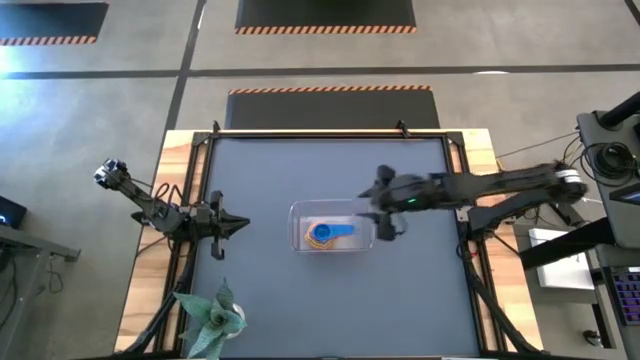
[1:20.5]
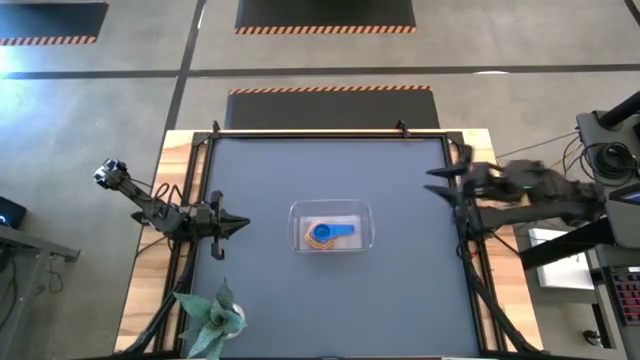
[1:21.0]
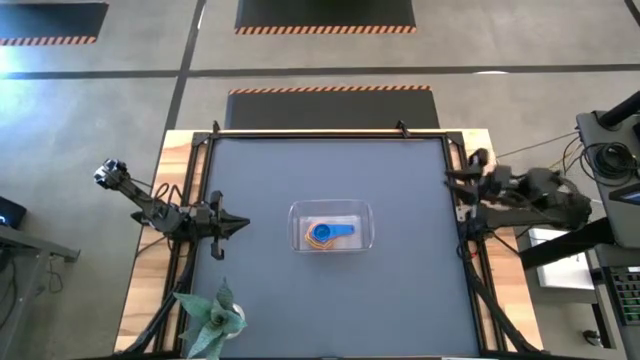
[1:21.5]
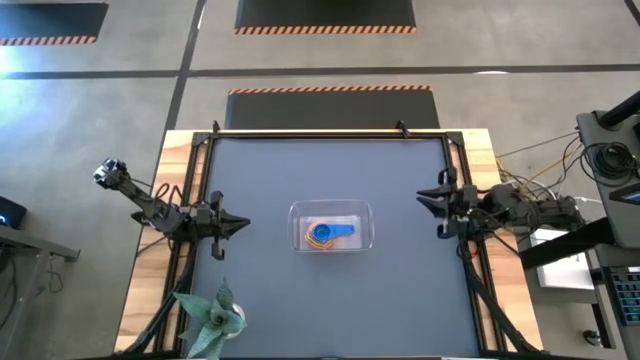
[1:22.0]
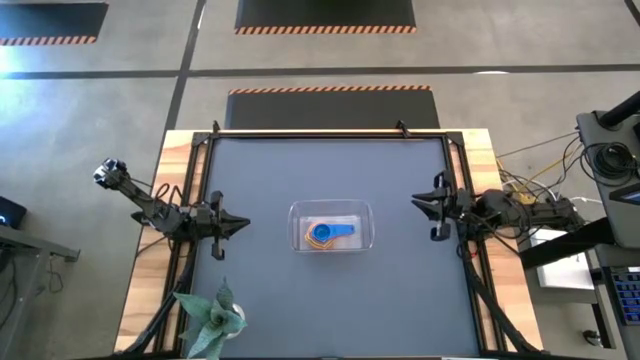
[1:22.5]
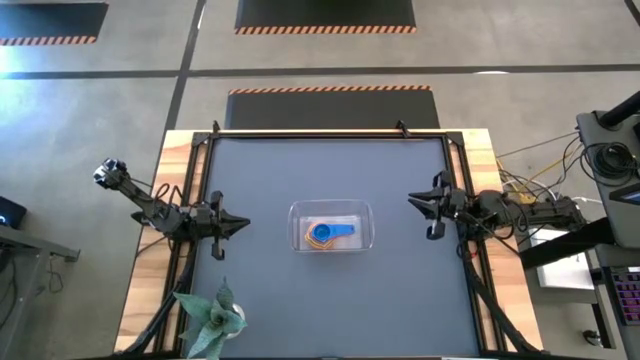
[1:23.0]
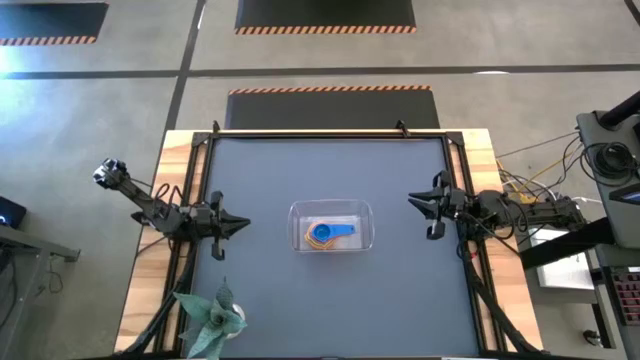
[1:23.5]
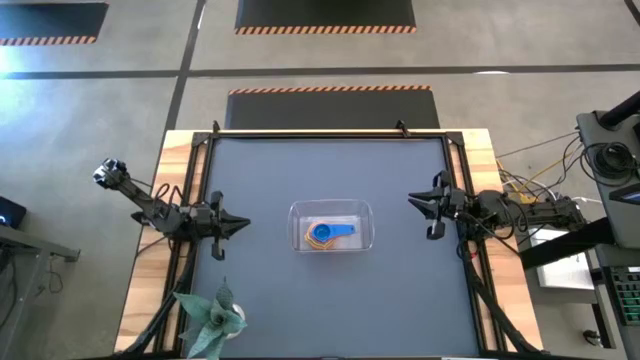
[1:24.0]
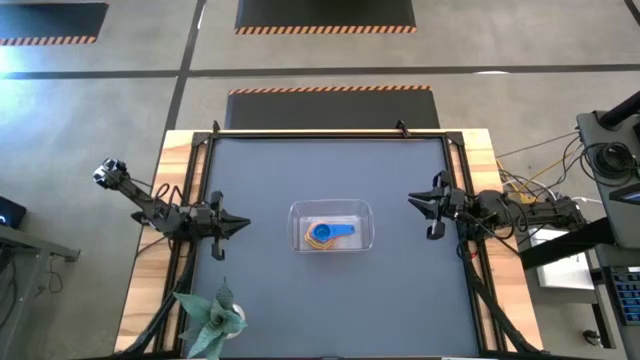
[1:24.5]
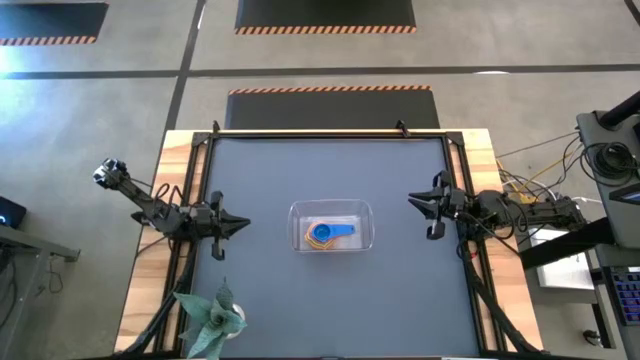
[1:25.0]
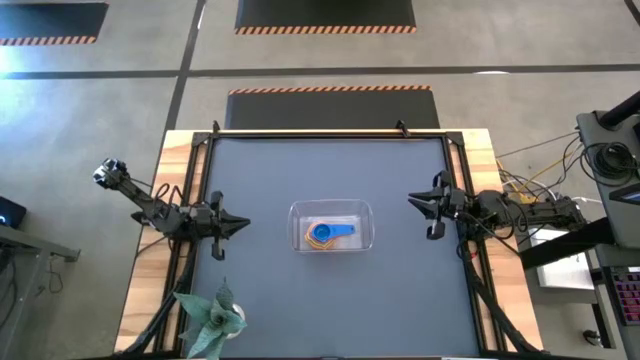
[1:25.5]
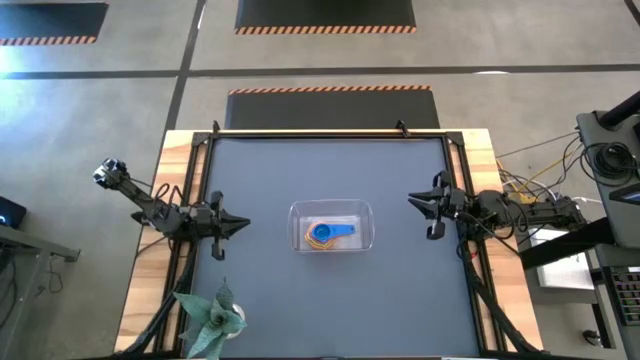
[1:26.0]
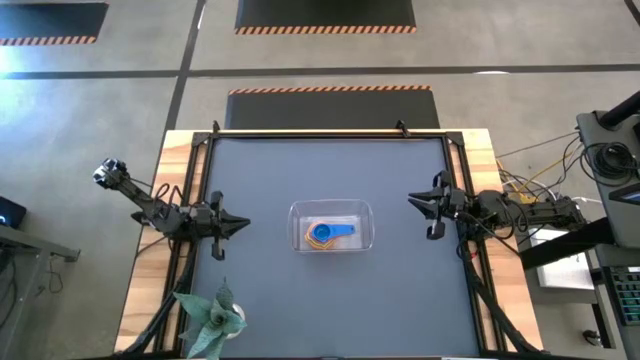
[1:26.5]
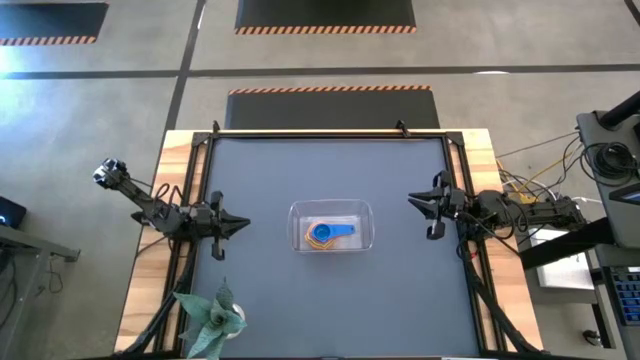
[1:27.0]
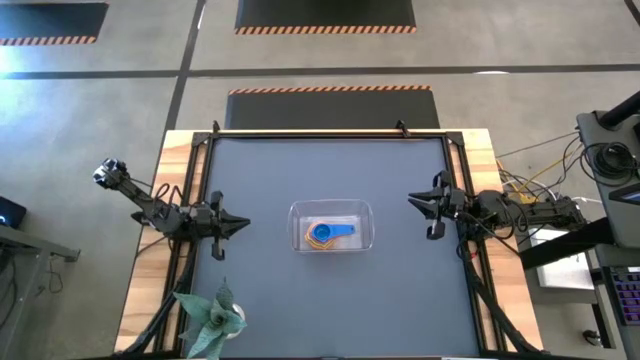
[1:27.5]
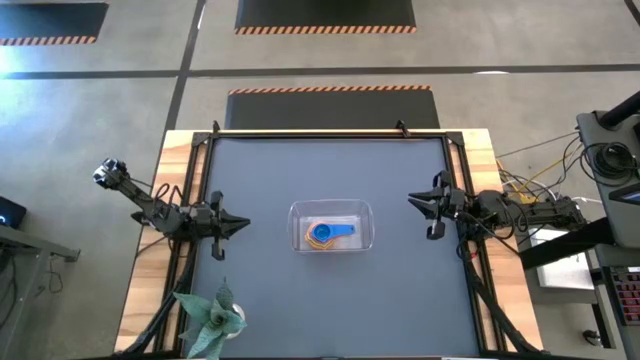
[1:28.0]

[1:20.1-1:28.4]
Task: Nest measuring cups in basket
Return to Home Position

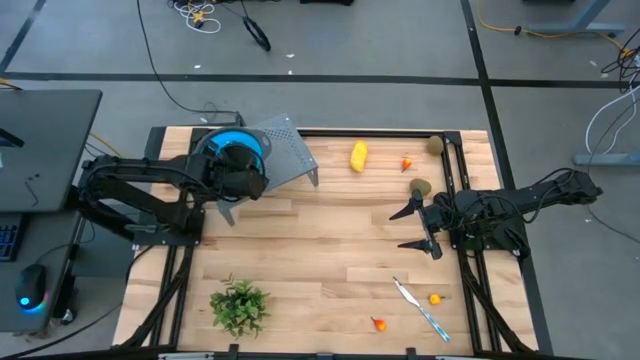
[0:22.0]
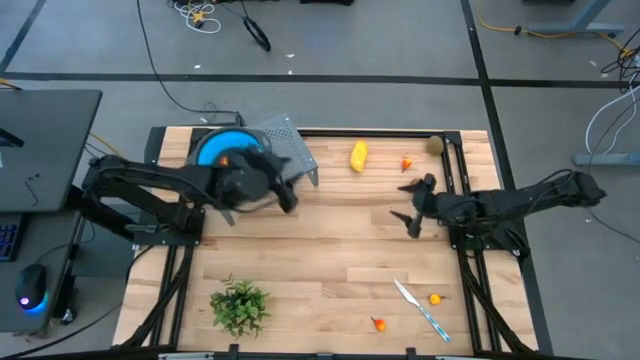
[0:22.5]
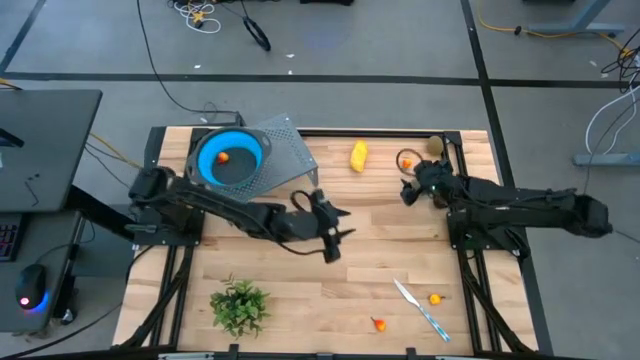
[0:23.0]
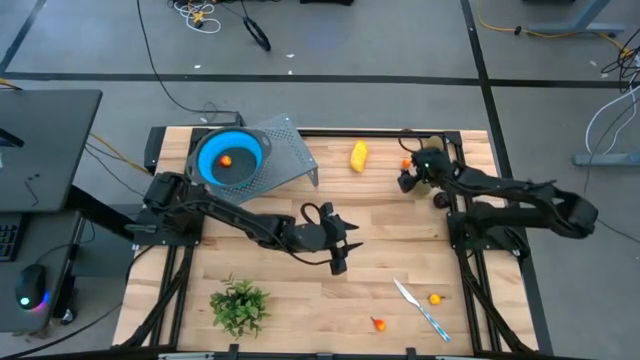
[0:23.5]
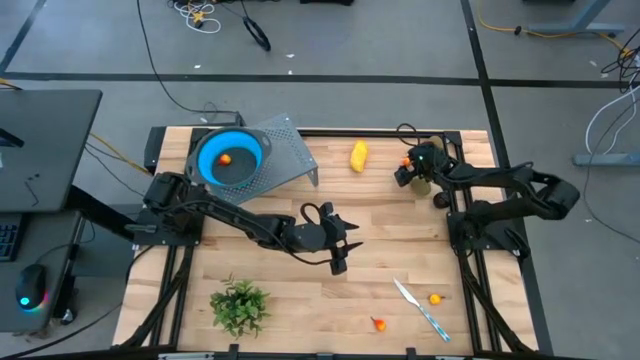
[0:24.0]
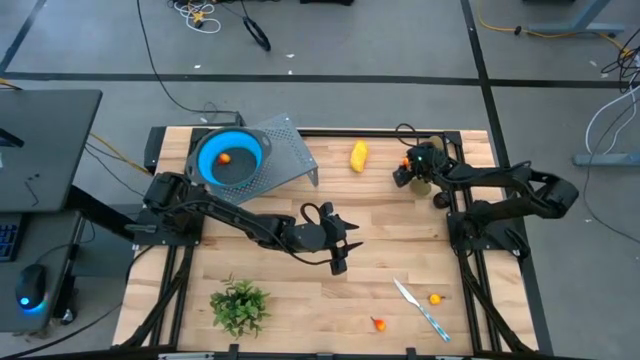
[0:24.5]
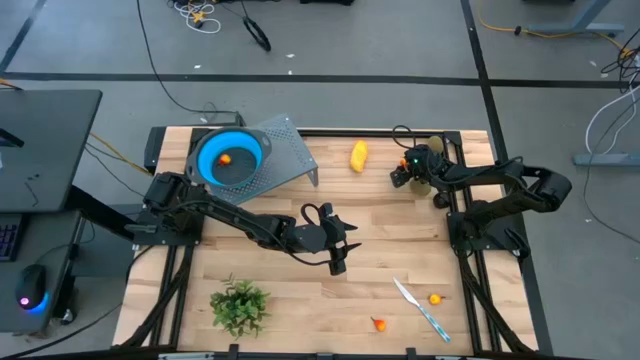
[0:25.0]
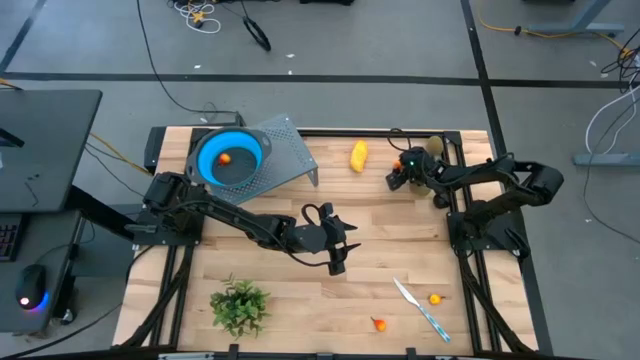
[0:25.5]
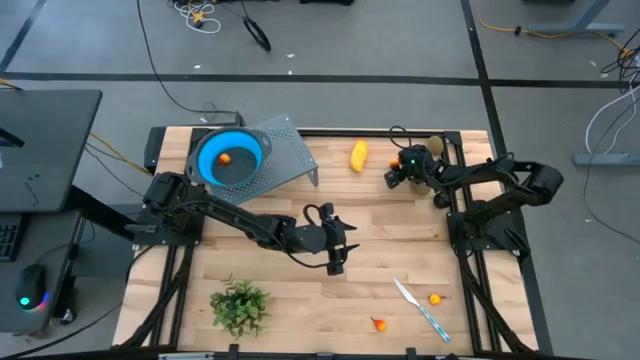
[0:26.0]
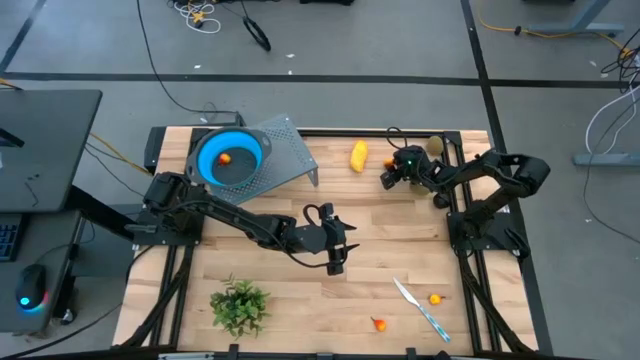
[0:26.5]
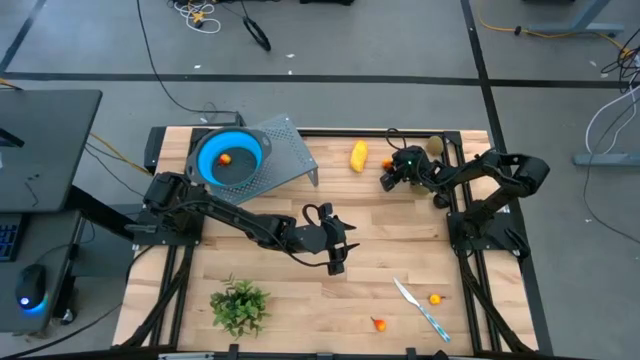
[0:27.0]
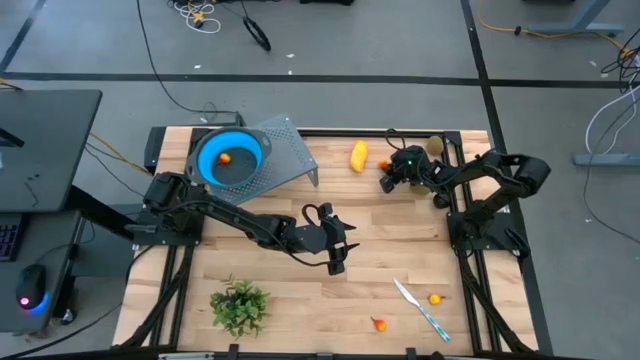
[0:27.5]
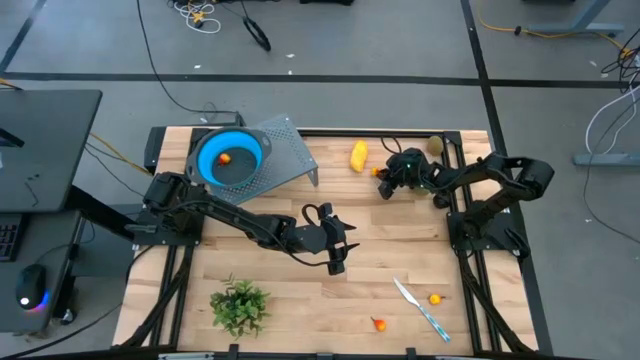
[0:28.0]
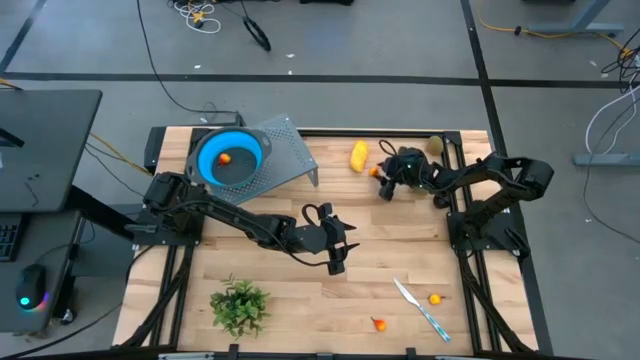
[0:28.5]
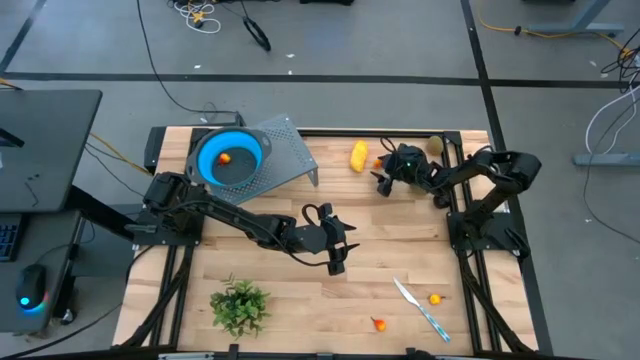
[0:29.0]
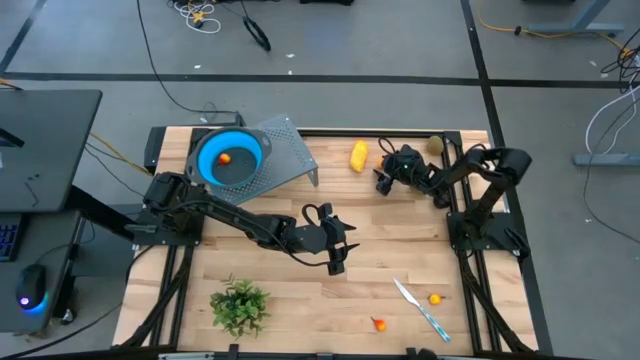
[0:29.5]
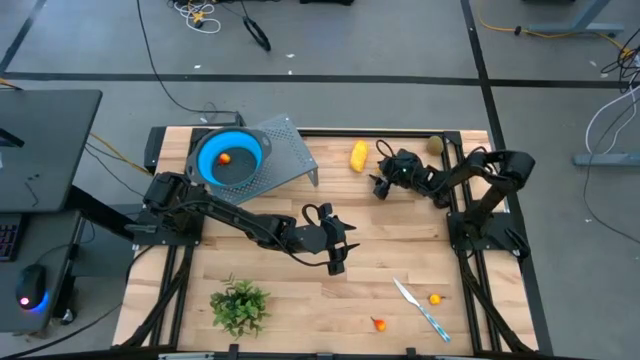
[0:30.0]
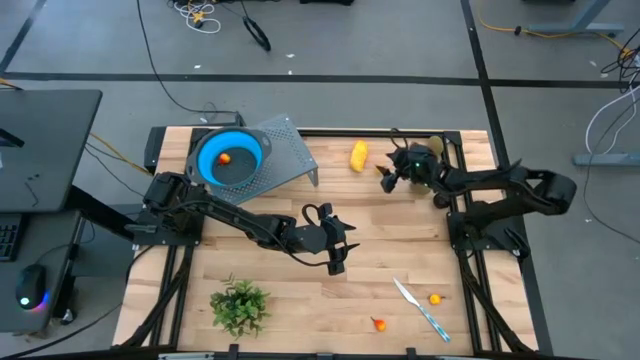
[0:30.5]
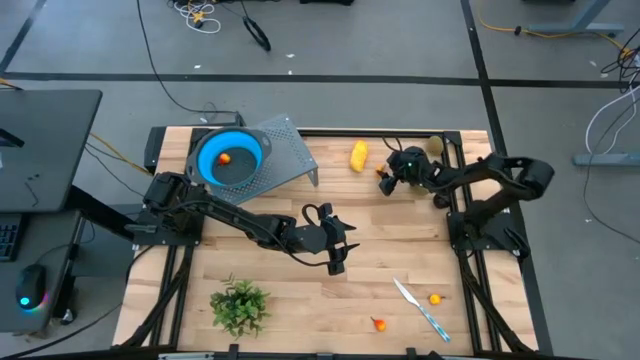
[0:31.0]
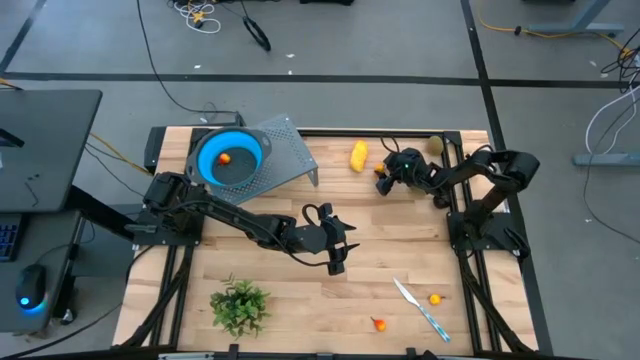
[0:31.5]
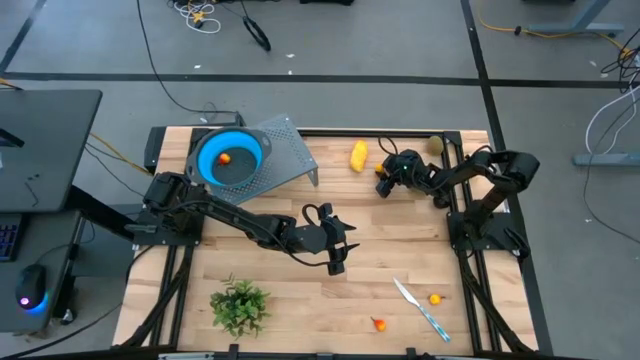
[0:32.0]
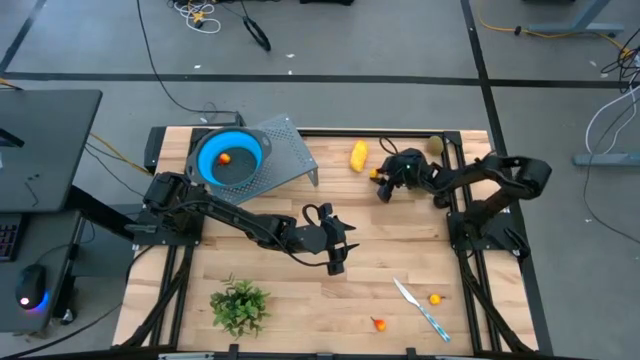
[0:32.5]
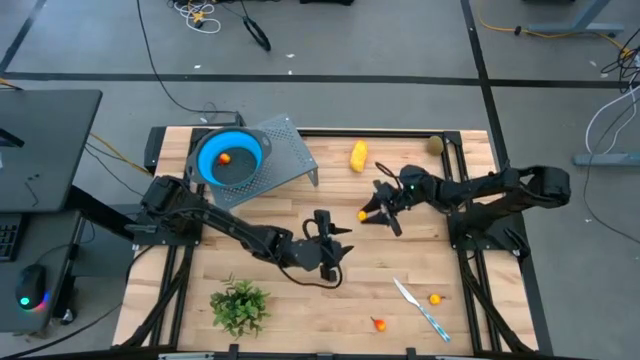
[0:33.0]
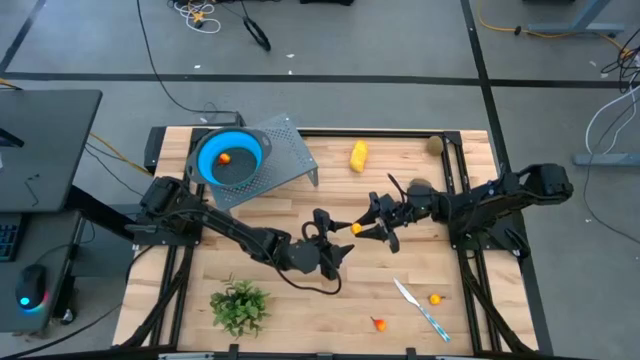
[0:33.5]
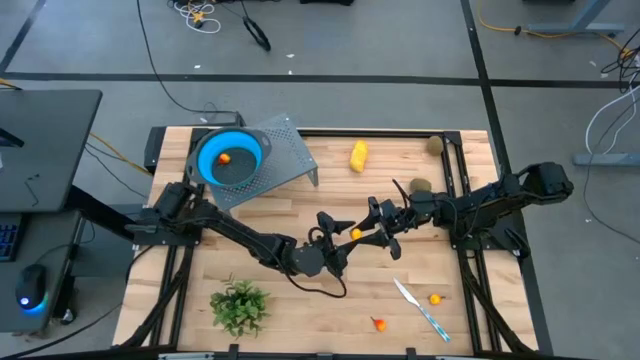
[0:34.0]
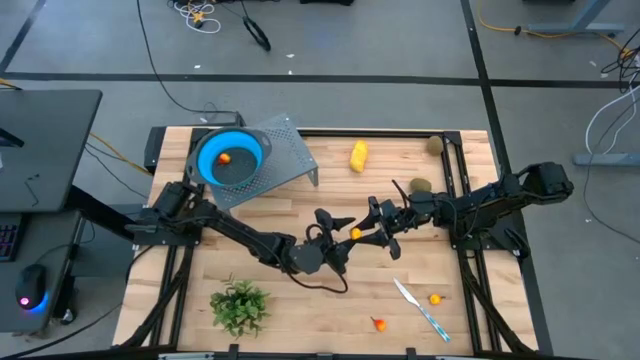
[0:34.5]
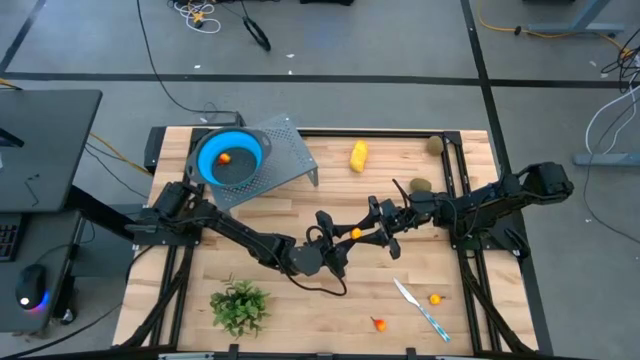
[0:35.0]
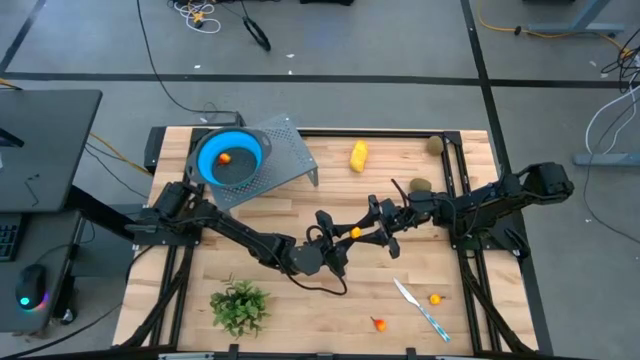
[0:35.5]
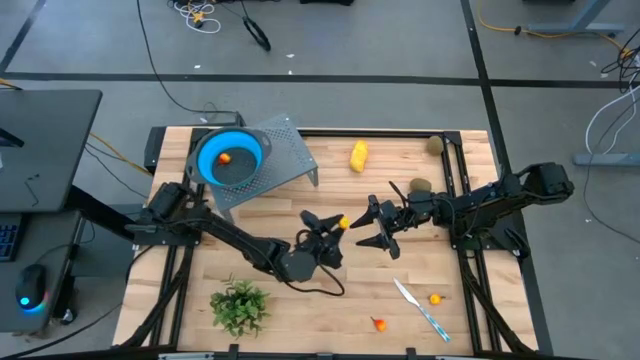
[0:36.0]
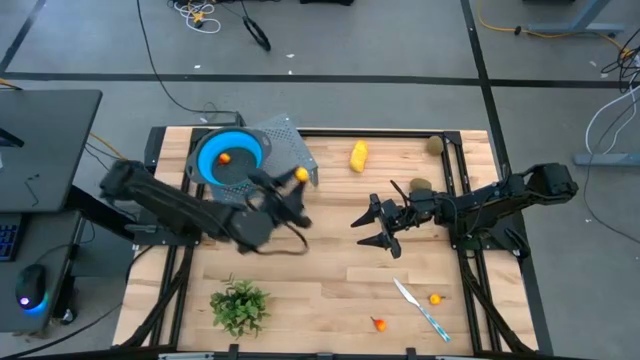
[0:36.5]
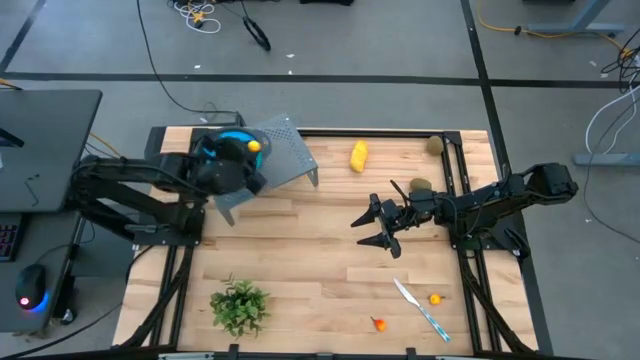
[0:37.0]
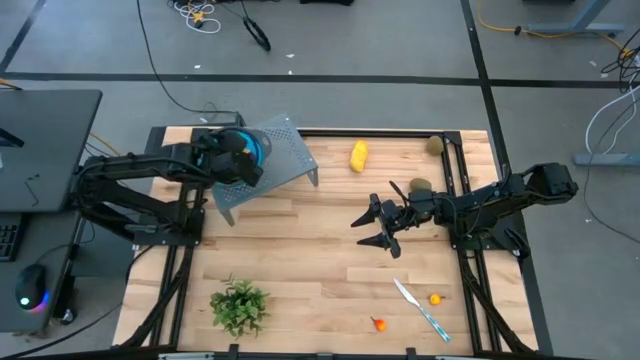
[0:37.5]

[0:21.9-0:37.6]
Task: Pick & Place Fruit
Put the yellow pear into the blue strainer bowl on the shelf
